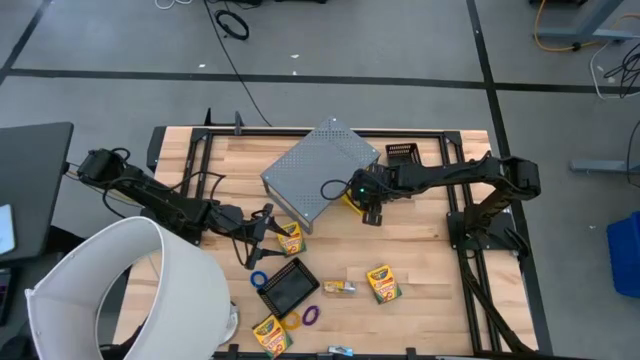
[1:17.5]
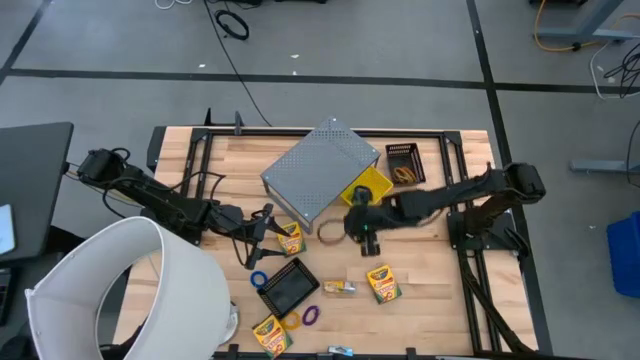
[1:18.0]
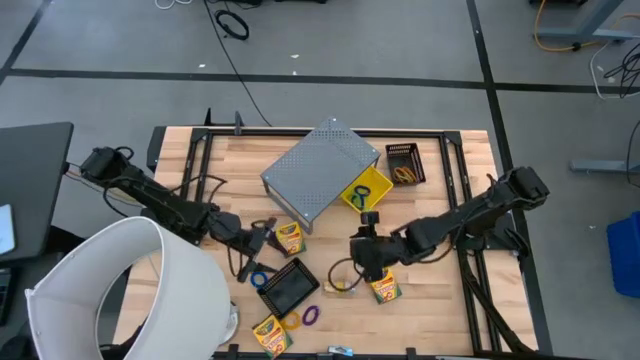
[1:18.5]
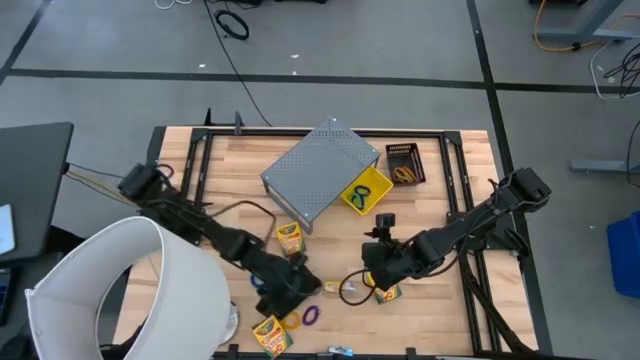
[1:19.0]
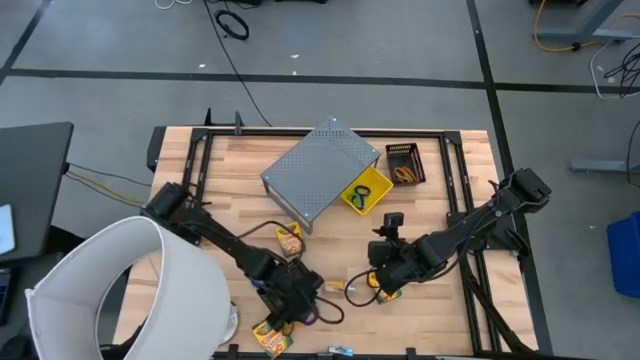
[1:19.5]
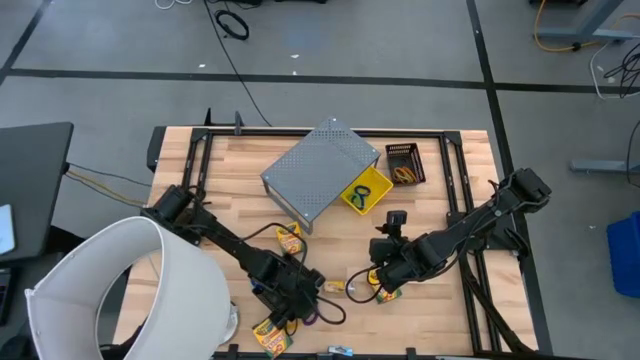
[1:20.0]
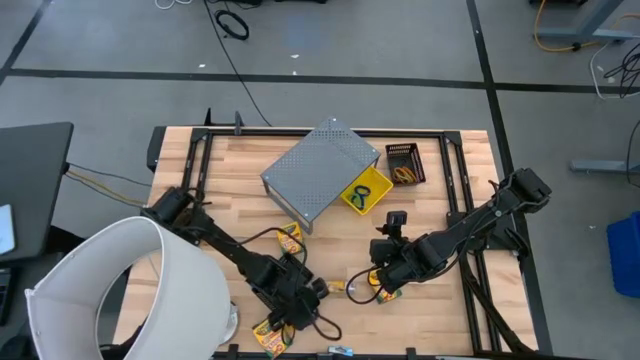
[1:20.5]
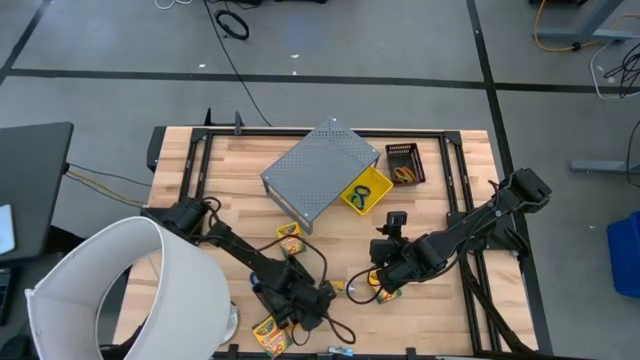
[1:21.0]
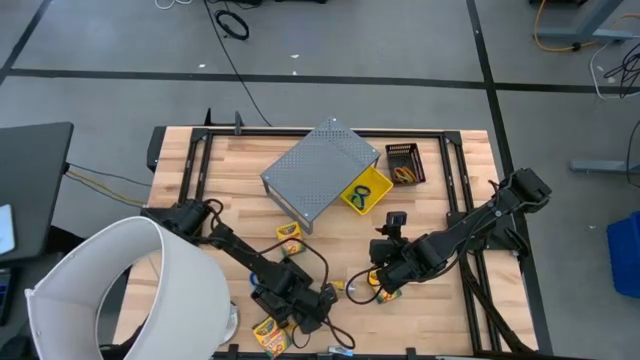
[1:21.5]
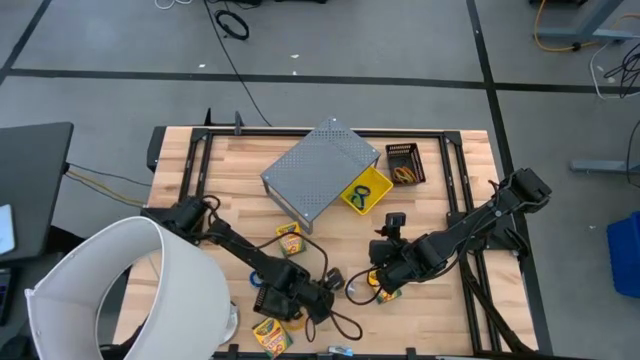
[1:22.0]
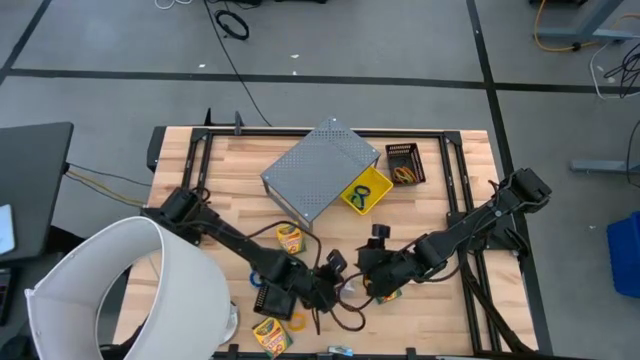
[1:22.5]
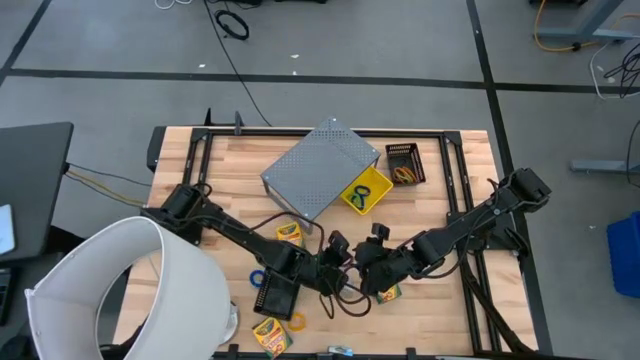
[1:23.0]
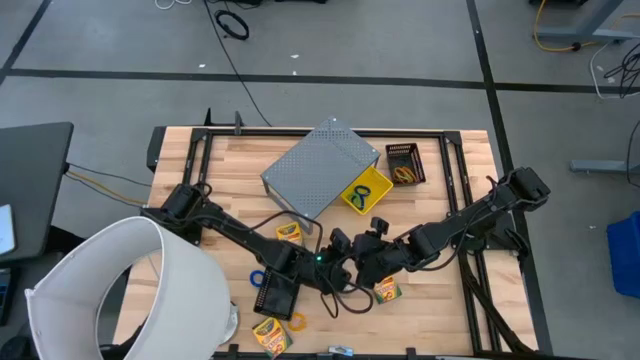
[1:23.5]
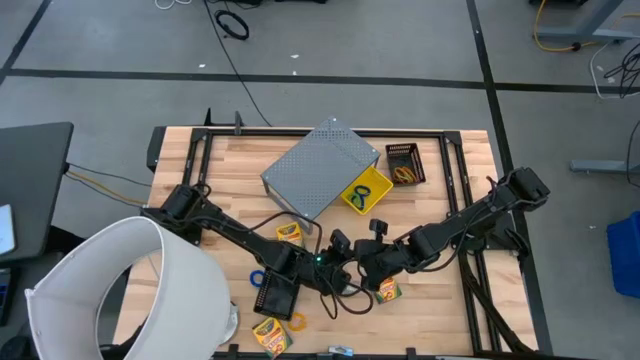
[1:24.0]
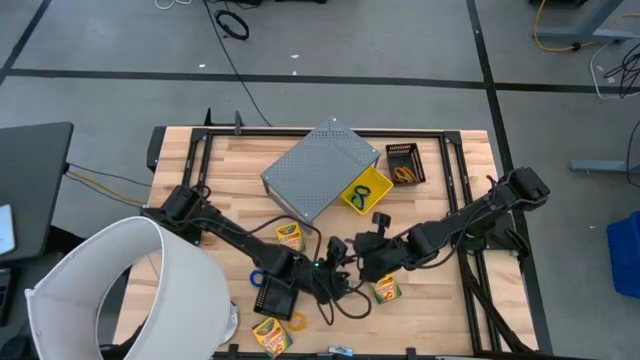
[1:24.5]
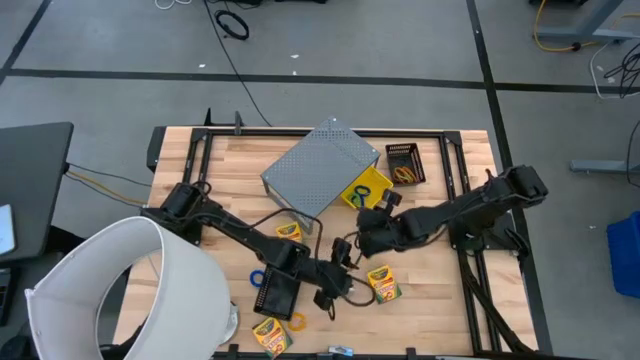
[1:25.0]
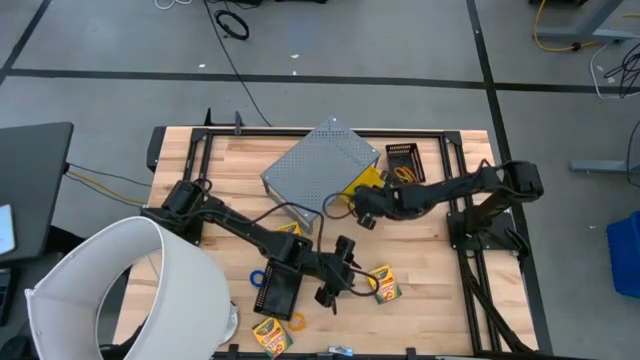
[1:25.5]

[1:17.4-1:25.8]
Task: Pick & Place Office Desk Supplies
Put the purple spring keychain into the yellow bin

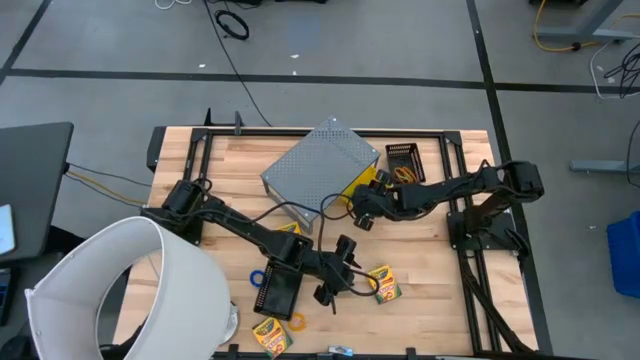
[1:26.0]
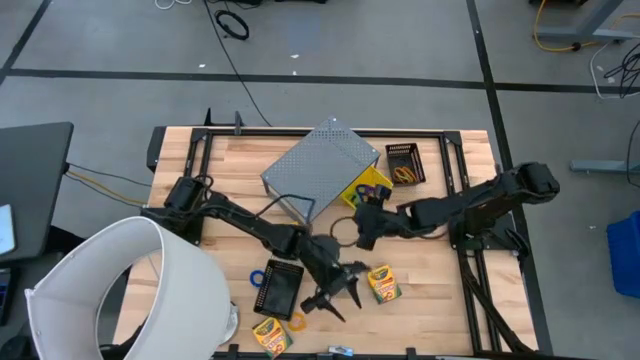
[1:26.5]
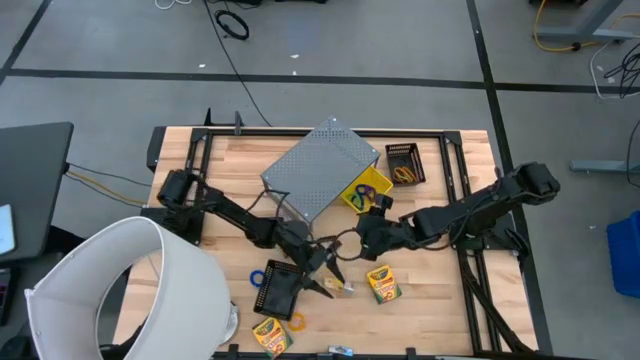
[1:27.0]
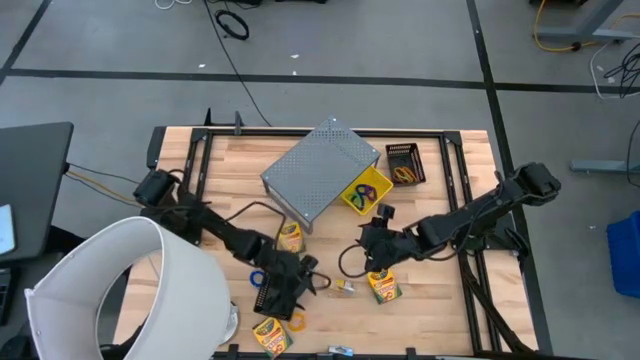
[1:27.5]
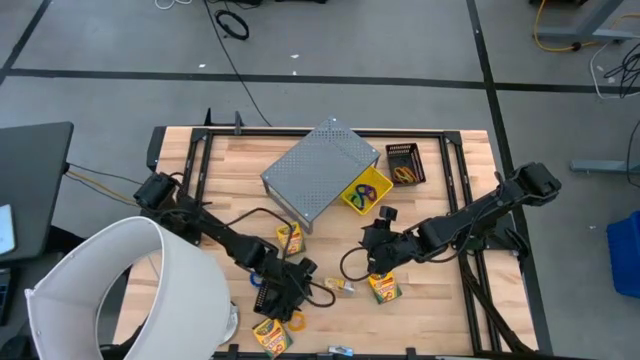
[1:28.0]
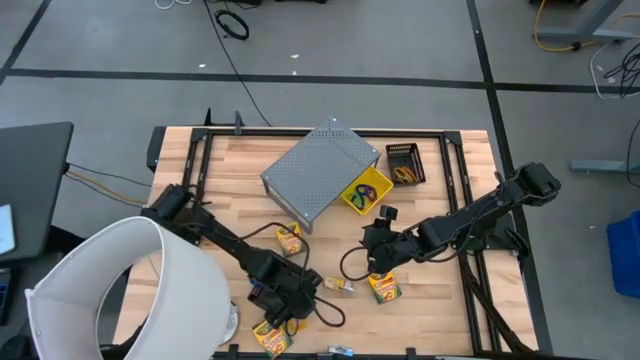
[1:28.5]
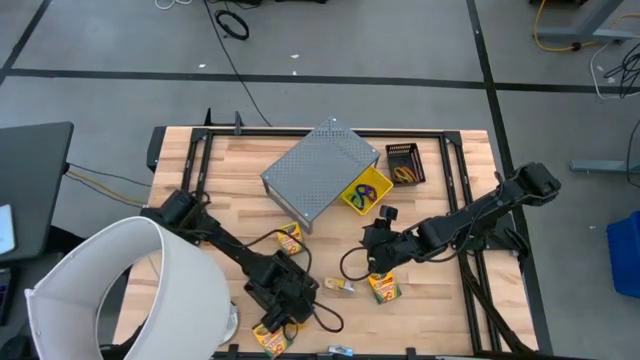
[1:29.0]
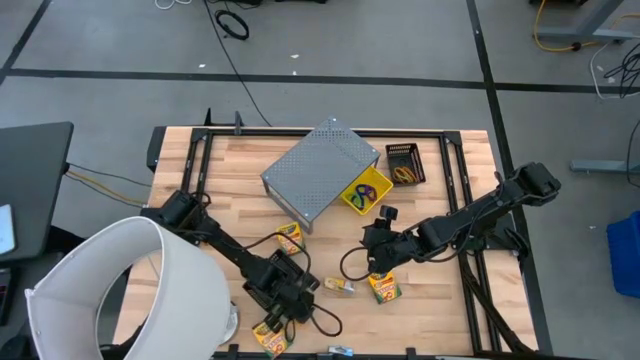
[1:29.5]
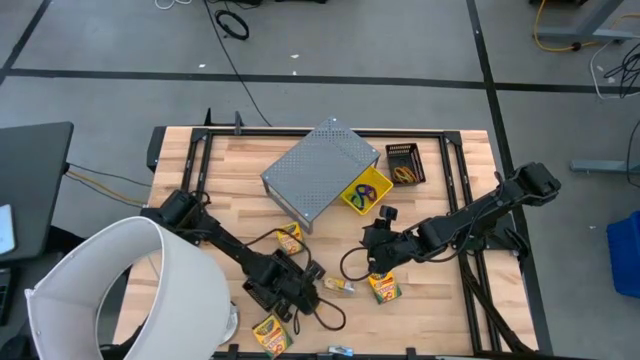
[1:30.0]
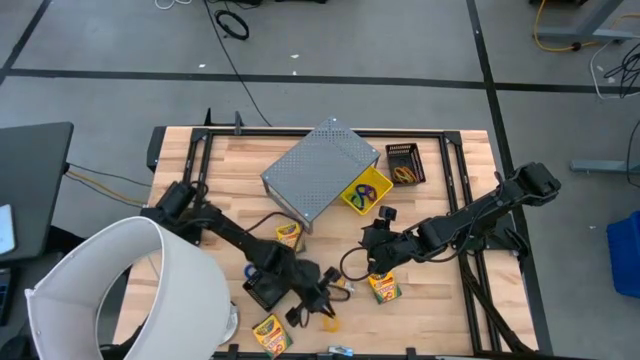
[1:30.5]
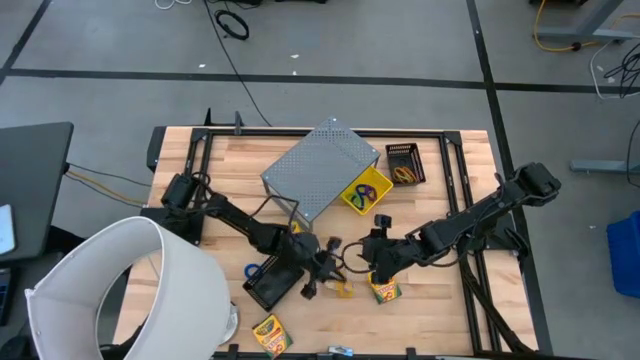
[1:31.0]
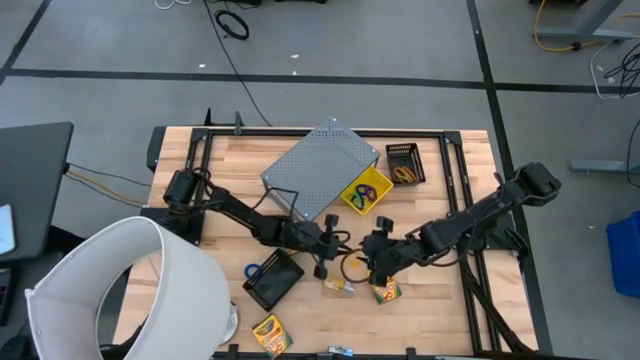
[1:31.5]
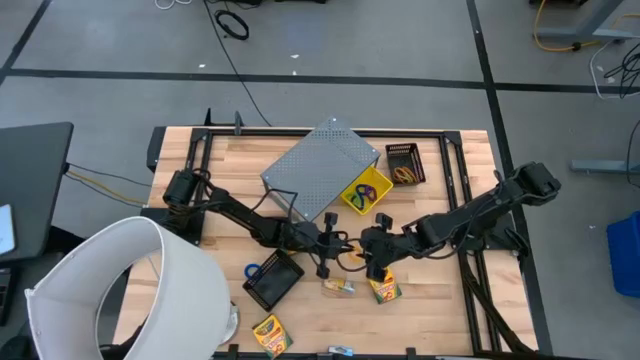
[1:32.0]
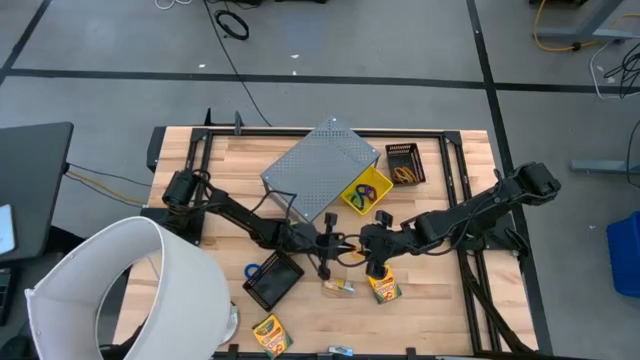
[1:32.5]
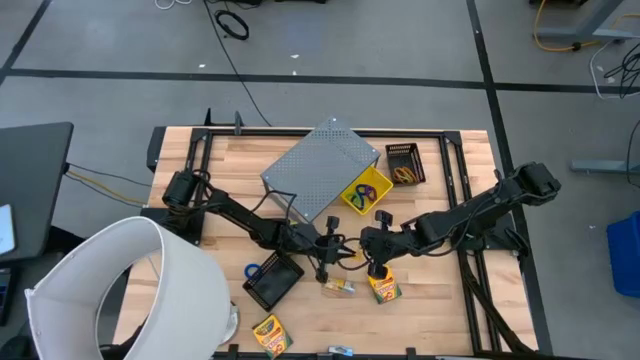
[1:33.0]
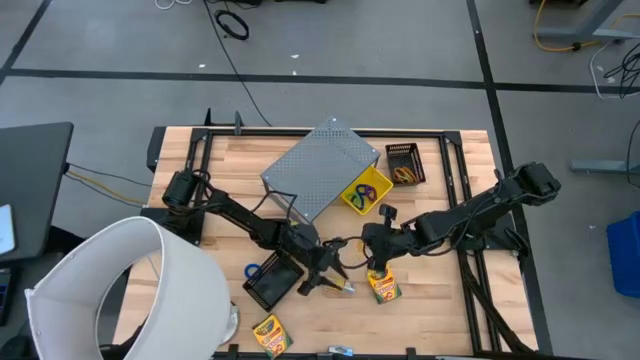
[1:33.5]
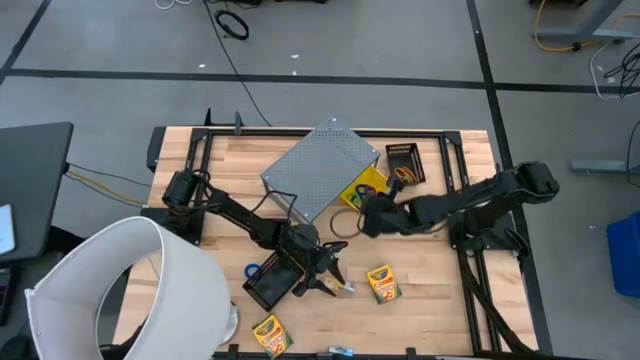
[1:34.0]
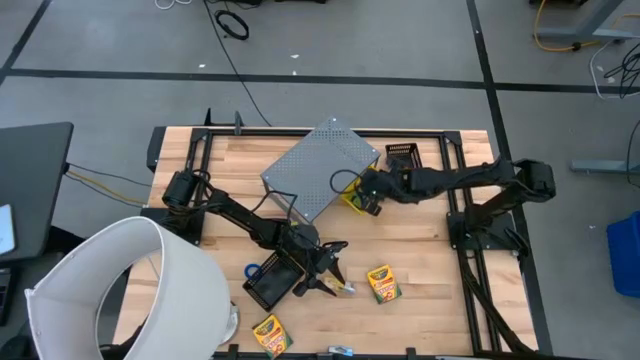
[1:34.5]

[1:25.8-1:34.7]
Put the yellow spring keychain into the yellow bin

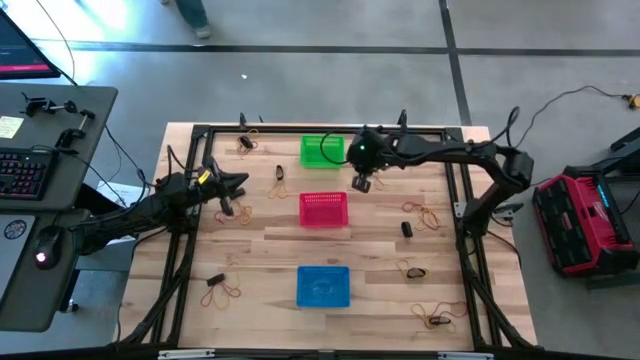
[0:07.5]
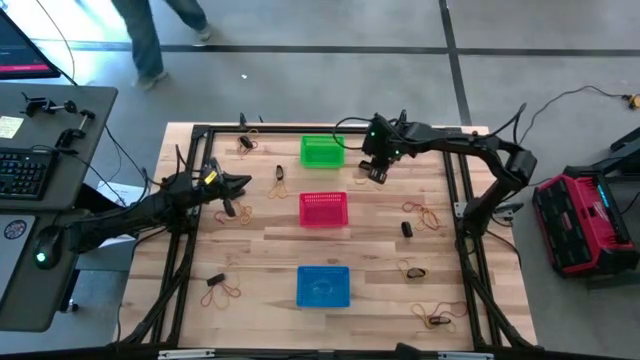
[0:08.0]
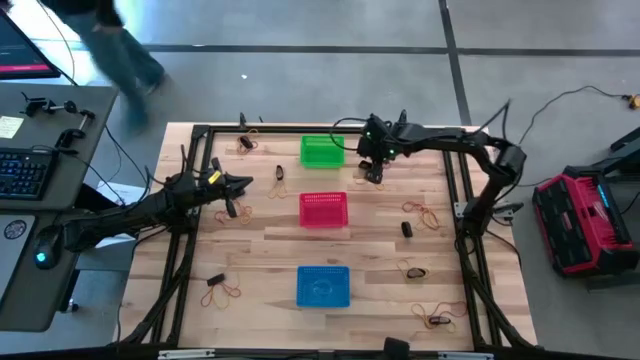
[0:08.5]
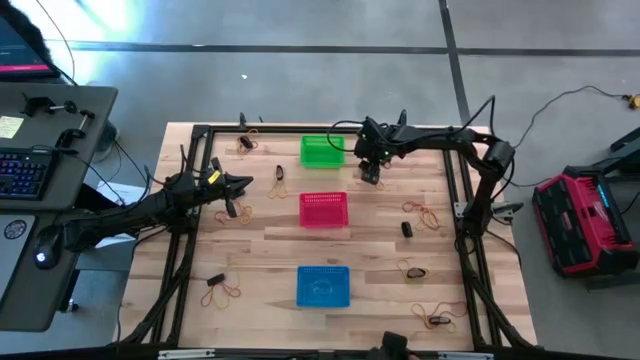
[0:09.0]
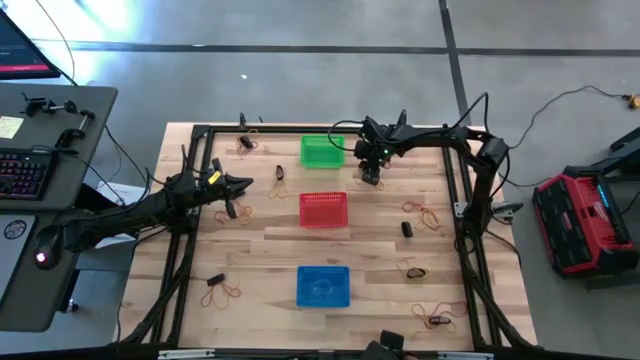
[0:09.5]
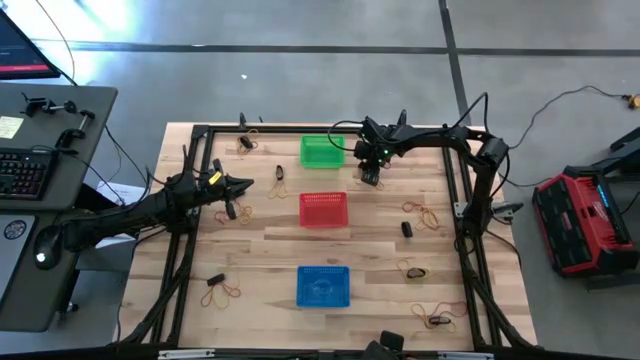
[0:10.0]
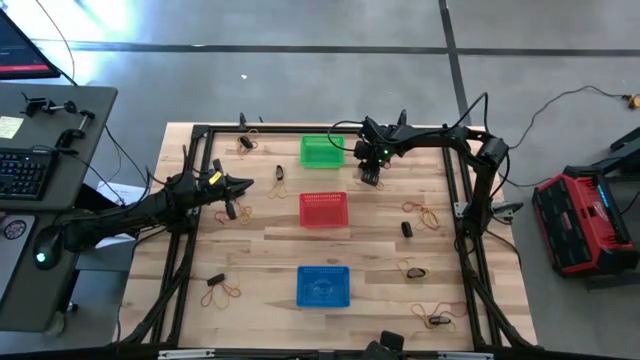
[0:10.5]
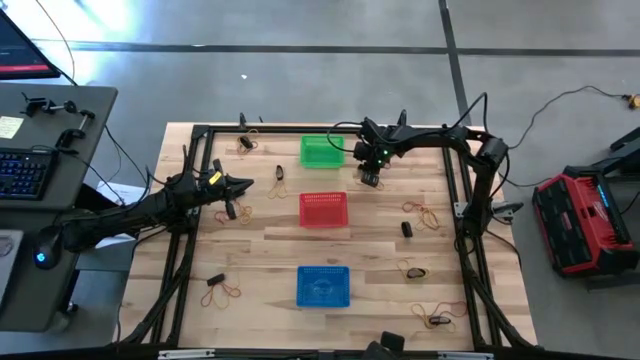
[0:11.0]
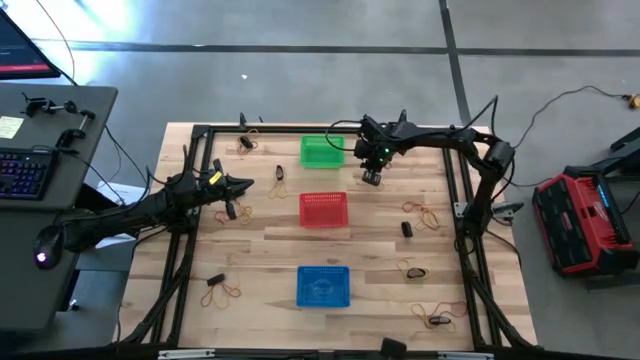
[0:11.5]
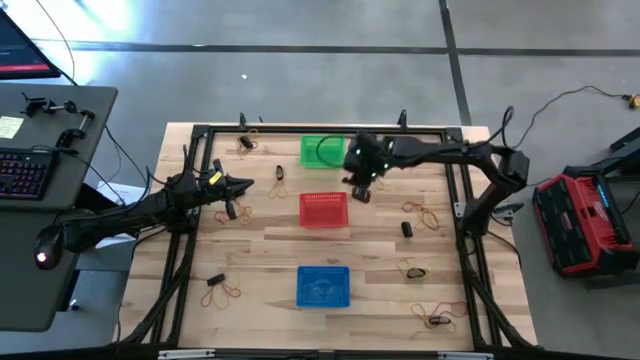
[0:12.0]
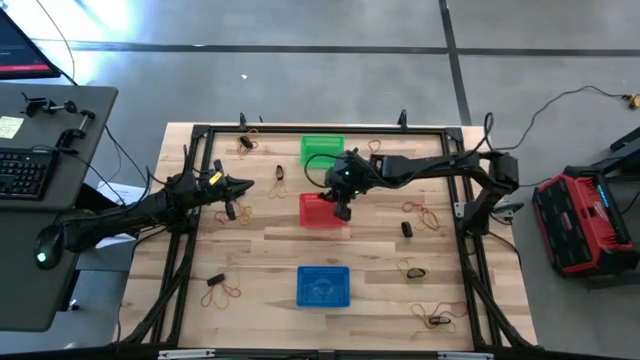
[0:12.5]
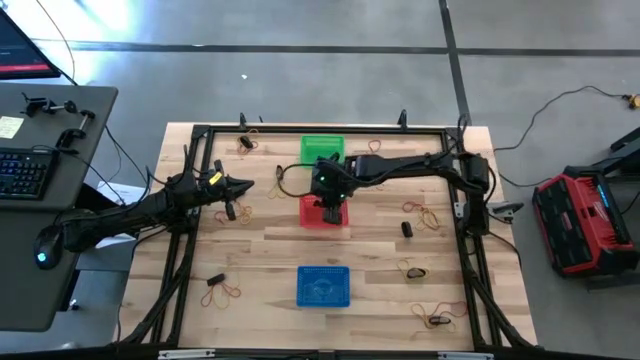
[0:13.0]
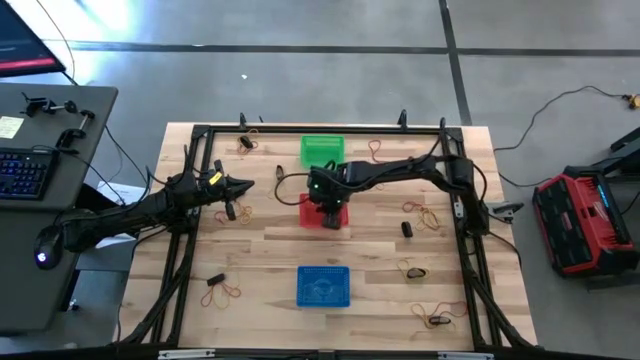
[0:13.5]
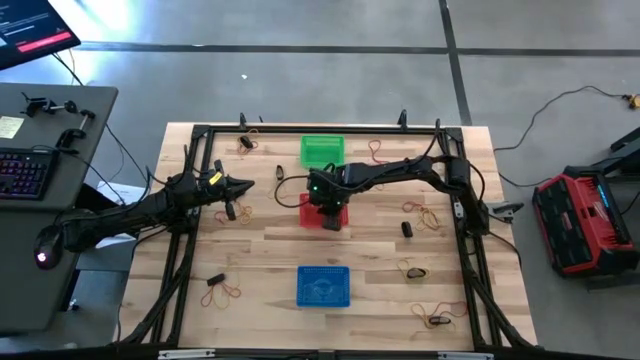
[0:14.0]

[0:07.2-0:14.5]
Task: Sort rubber bands into baskets
Put the black rubber band into the red bin
